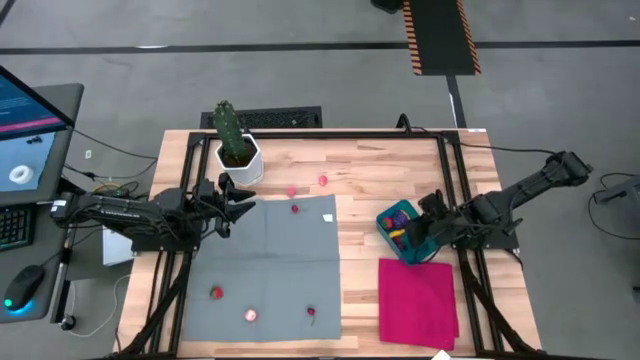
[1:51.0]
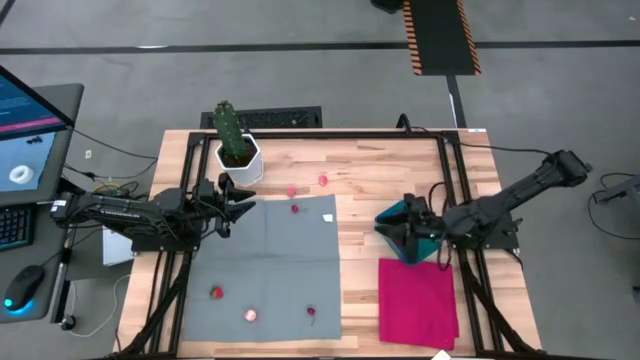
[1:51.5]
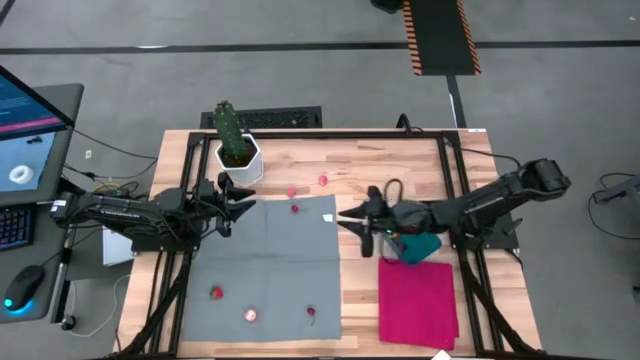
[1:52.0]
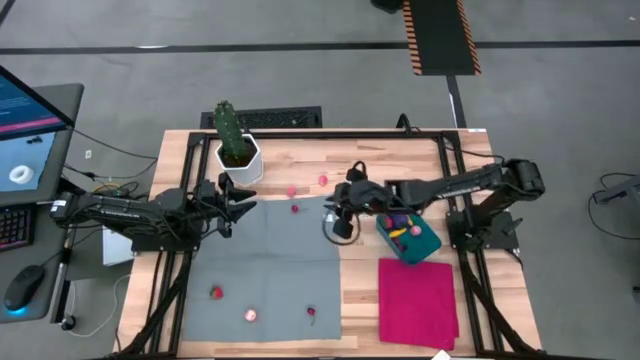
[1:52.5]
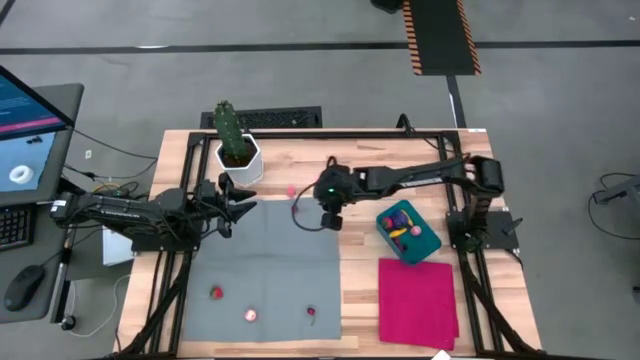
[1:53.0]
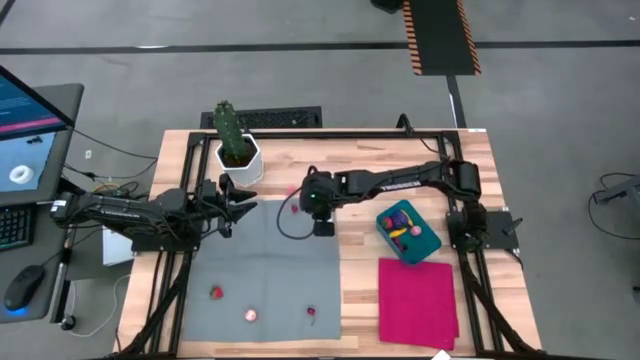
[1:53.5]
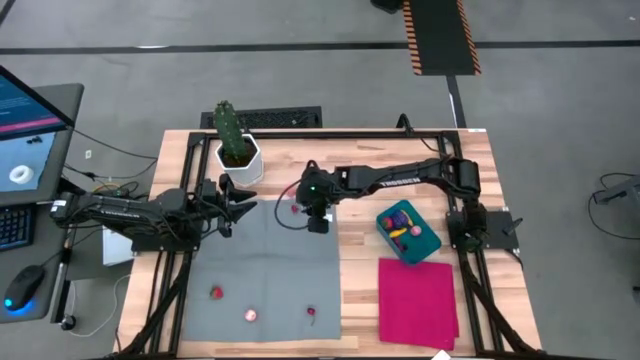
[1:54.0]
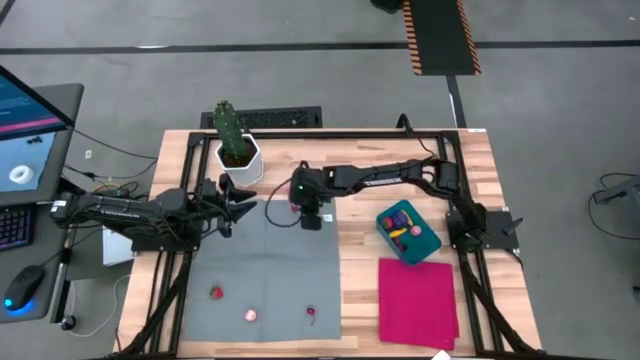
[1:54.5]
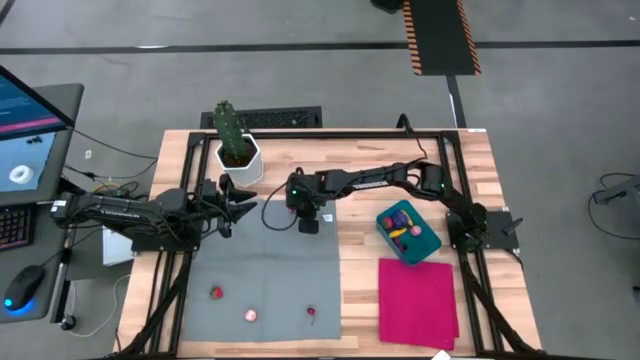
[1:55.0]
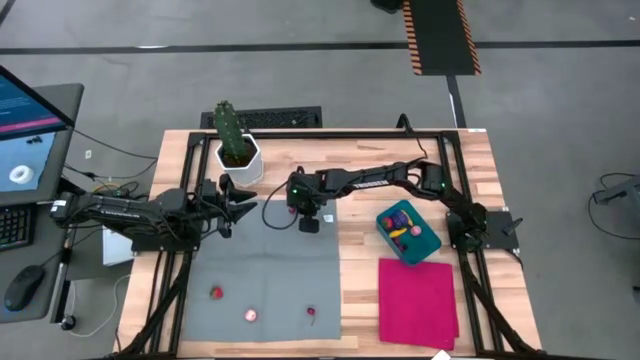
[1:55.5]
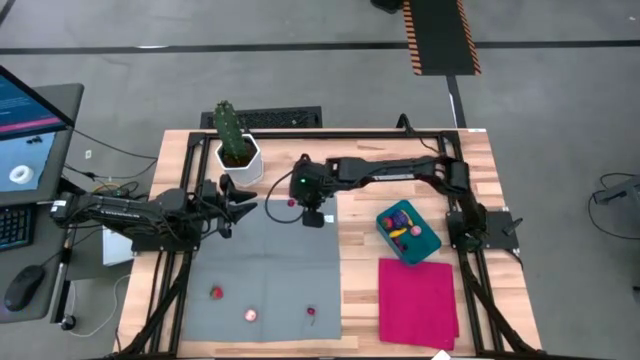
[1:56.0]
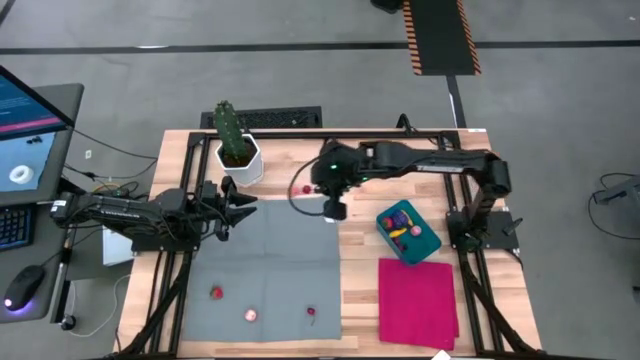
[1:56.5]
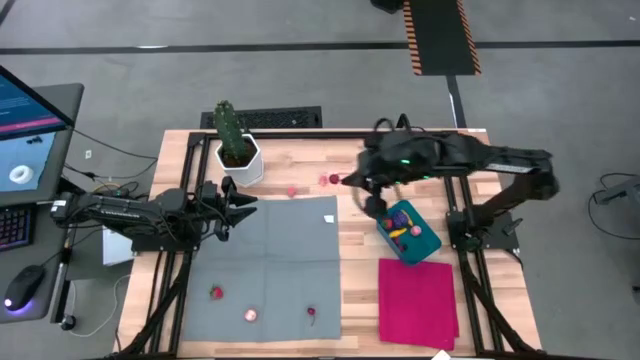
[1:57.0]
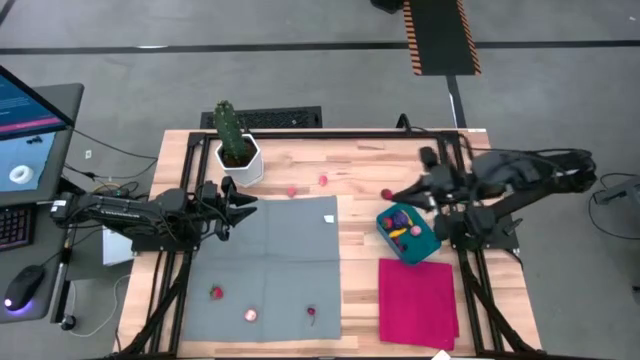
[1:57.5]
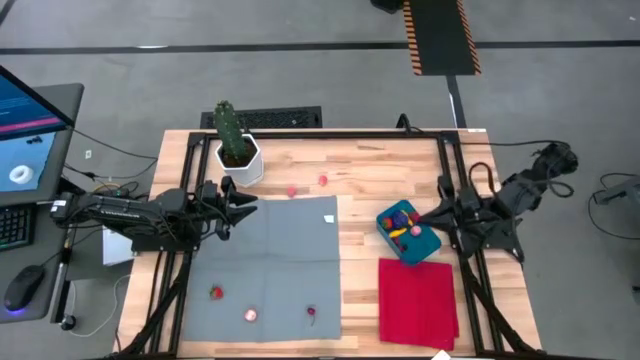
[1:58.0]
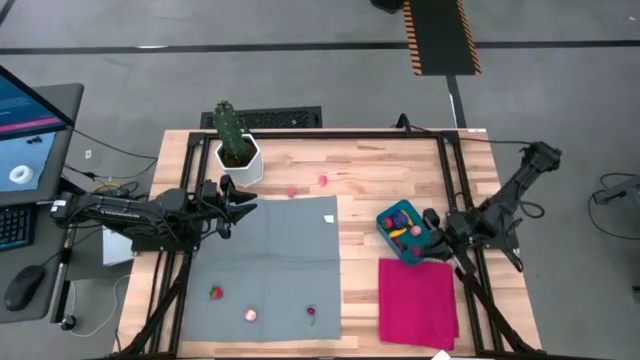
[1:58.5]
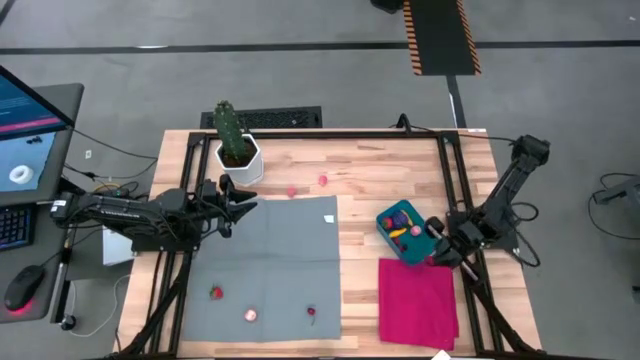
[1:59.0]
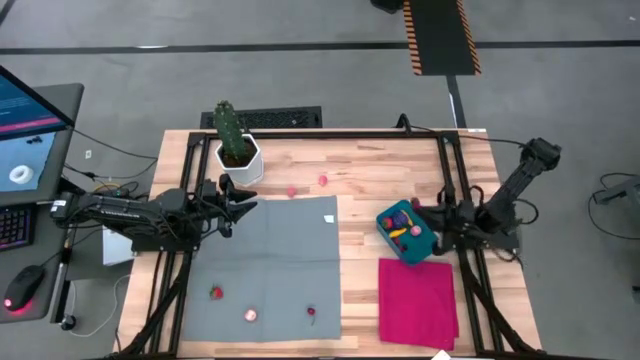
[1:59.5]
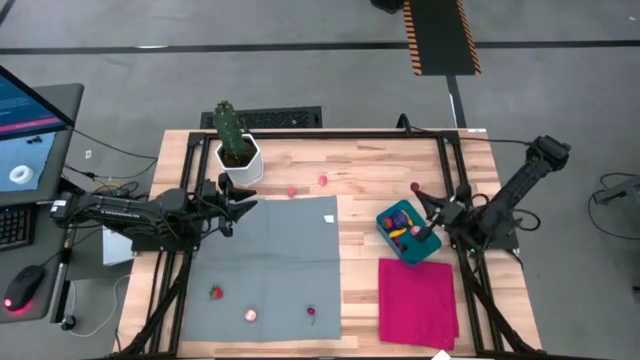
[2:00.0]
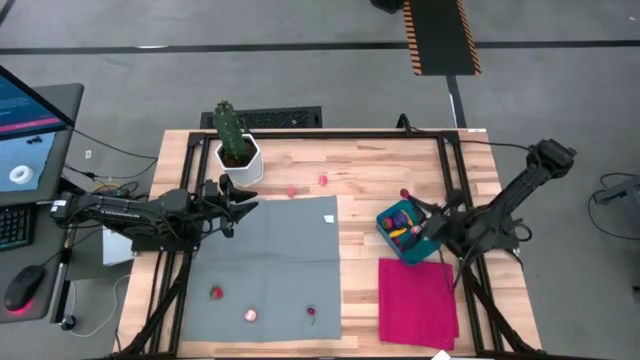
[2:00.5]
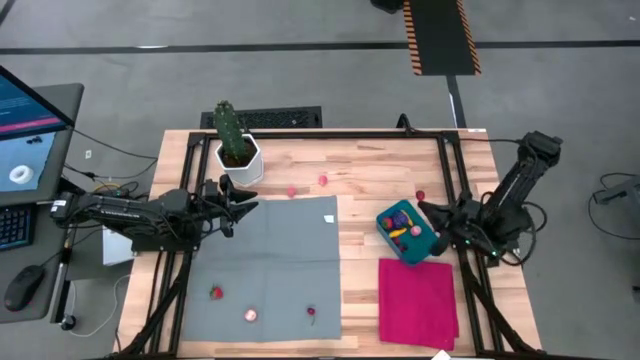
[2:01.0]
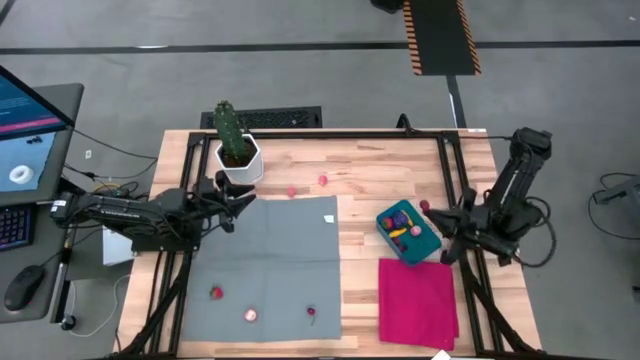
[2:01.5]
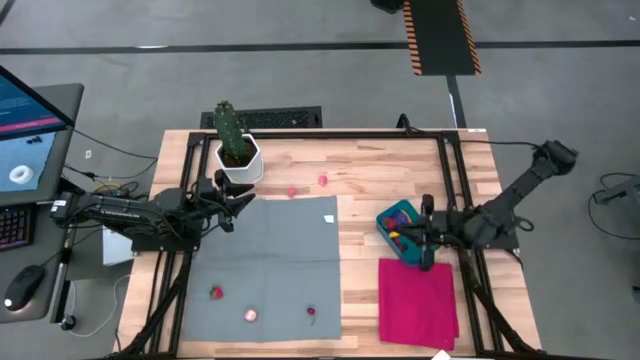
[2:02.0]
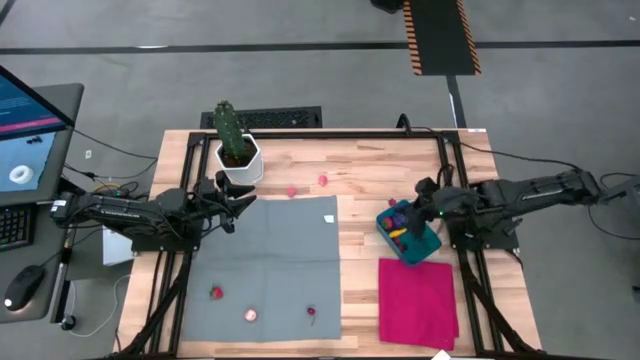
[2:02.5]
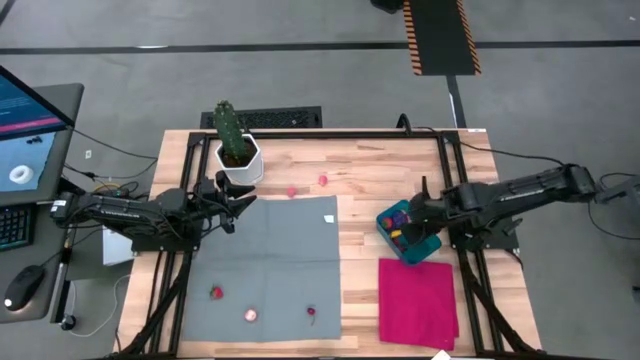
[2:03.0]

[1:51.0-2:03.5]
Task: Pick and placing Produce into tupperware
Put the red cherry into the blue bin

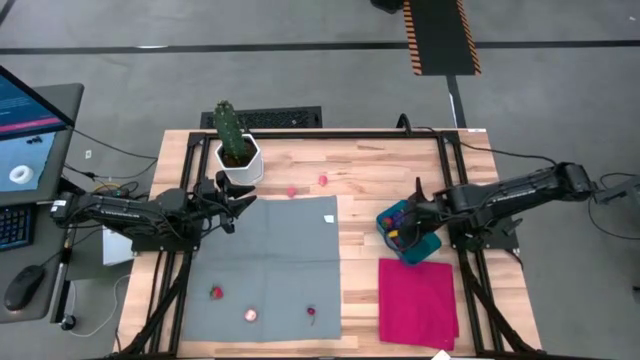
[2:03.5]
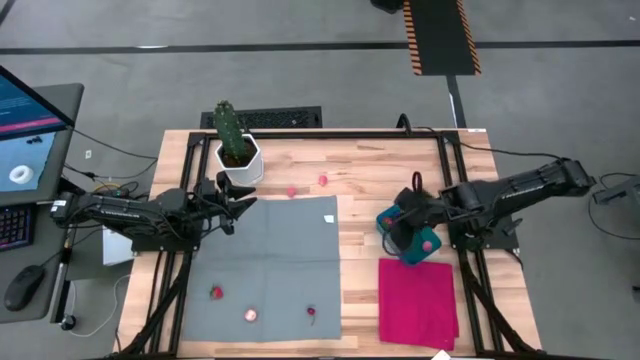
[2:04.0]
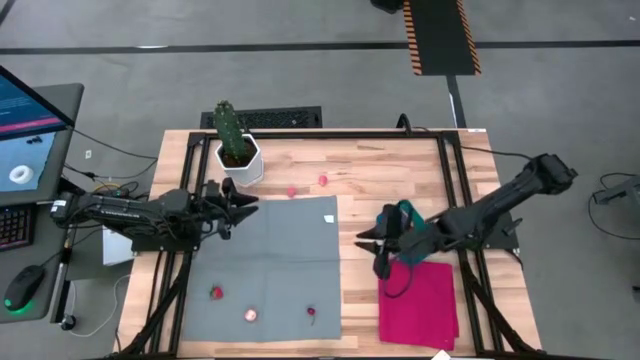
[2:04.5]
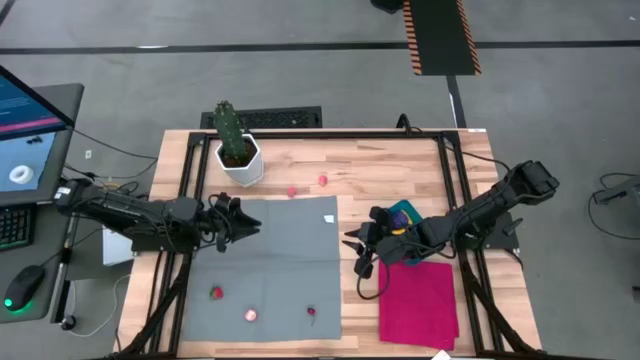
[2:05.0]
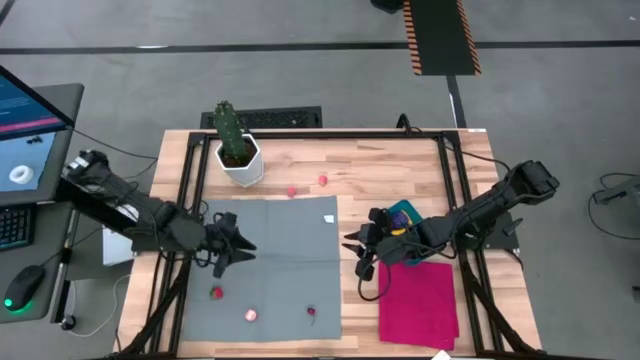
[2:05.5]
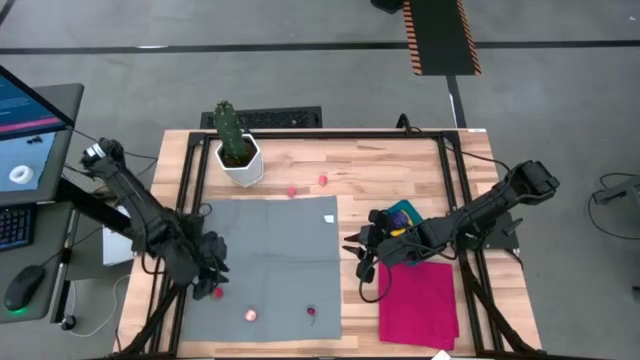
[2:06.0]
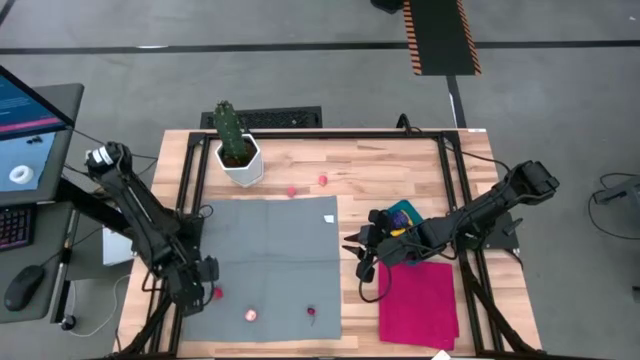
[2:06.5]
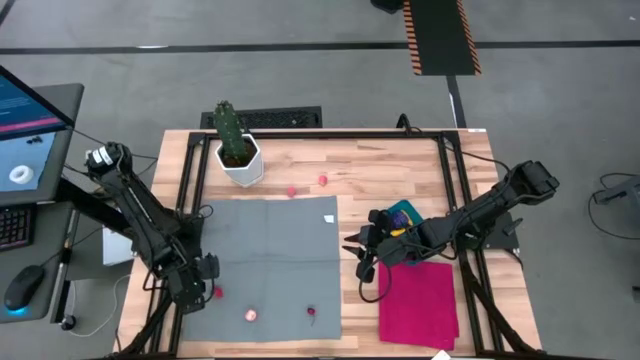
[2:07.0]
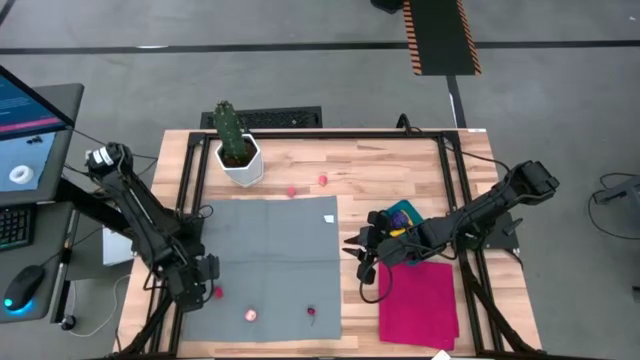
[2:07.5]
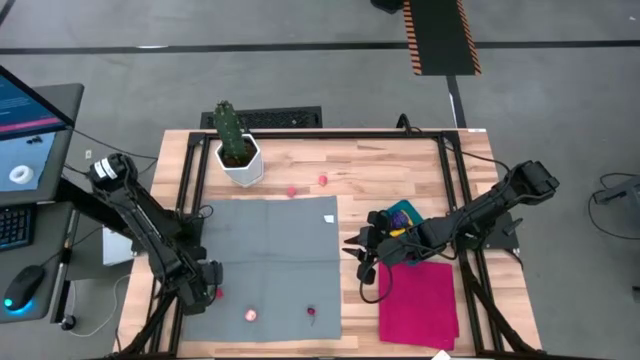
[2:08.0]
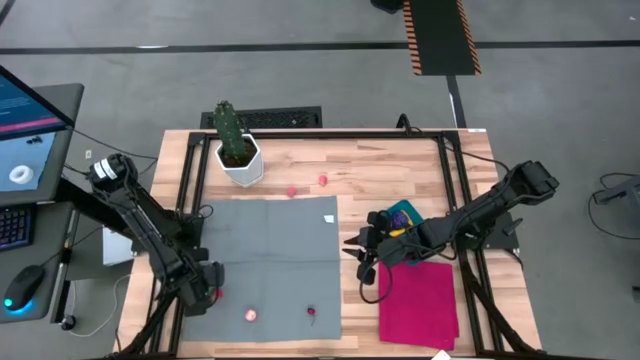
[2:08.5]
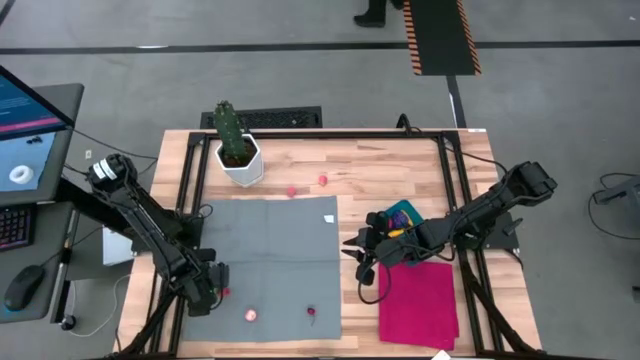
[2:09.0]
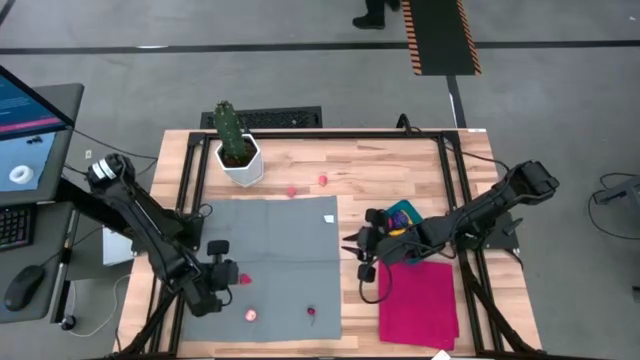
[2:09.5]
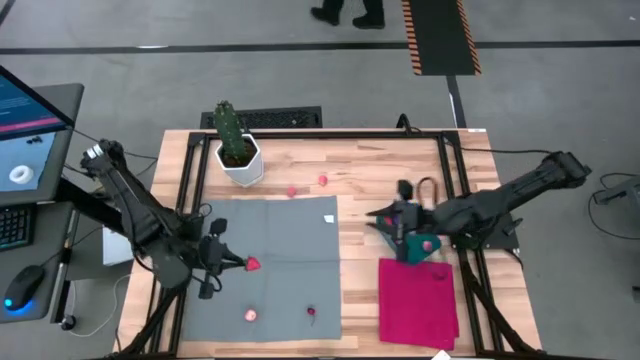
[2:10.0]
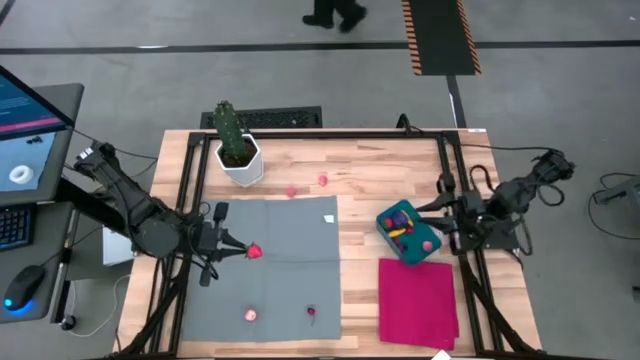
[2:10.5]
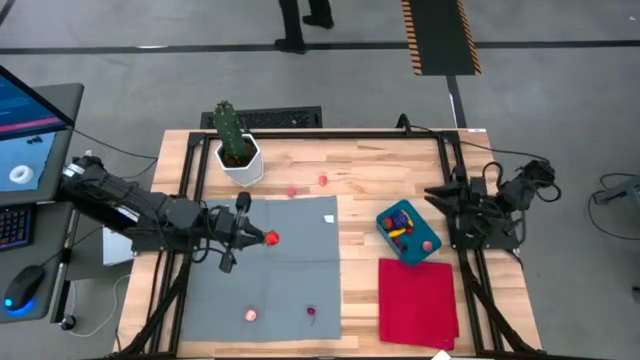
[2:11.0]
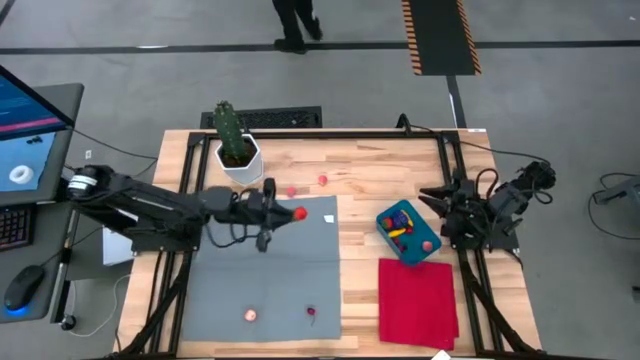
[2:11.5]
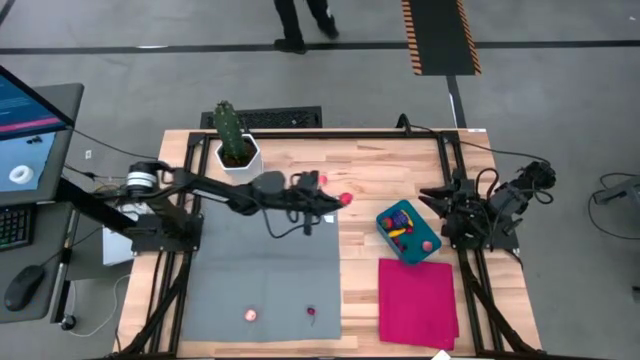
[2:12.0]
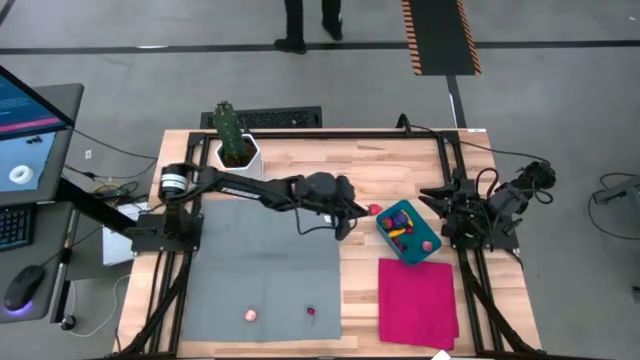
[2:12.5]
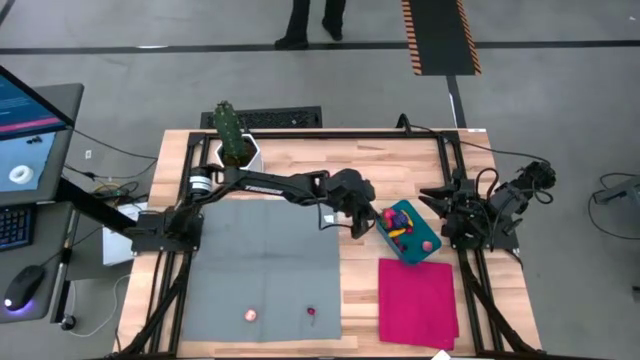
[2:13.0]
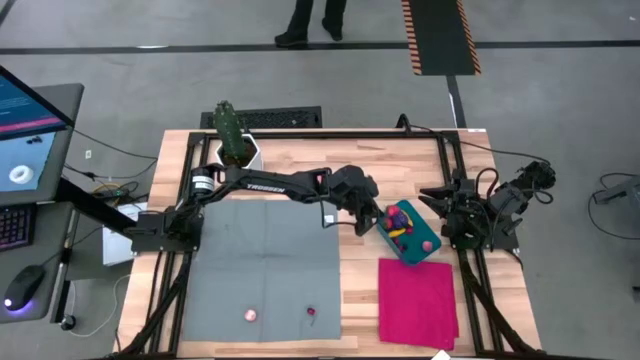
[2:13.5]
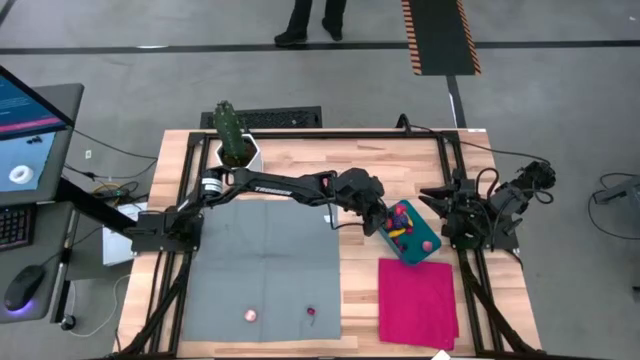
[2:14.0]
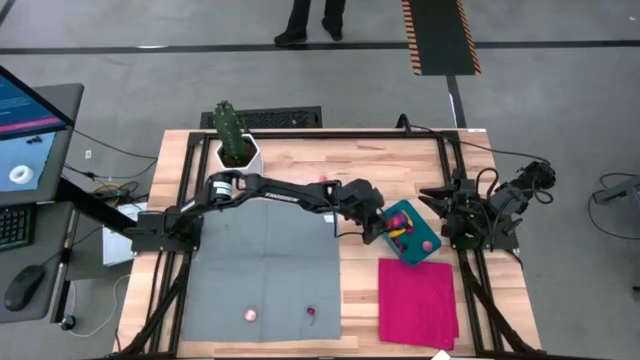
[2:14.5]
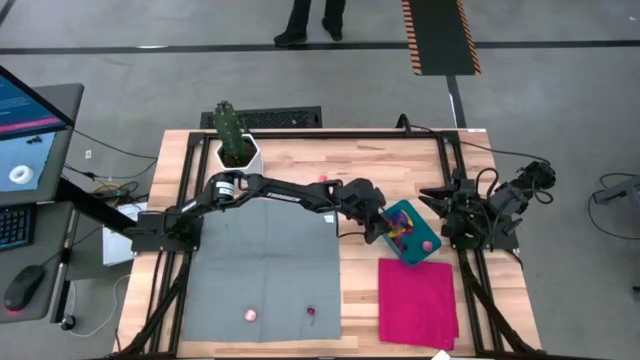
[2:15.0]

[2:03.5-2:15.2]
Put the red strawberry into the blue bin
